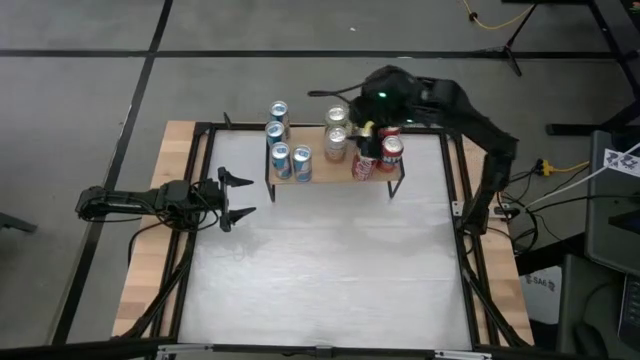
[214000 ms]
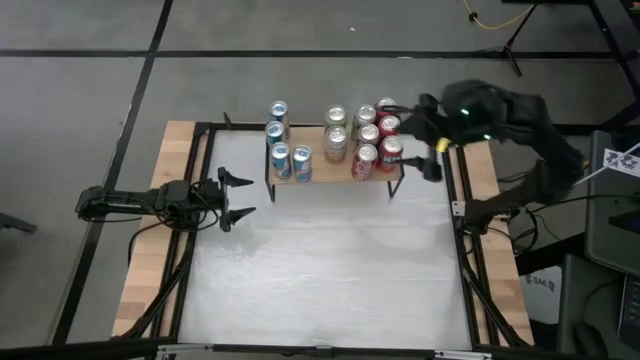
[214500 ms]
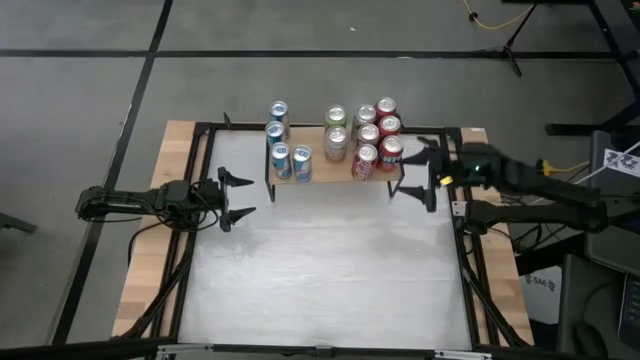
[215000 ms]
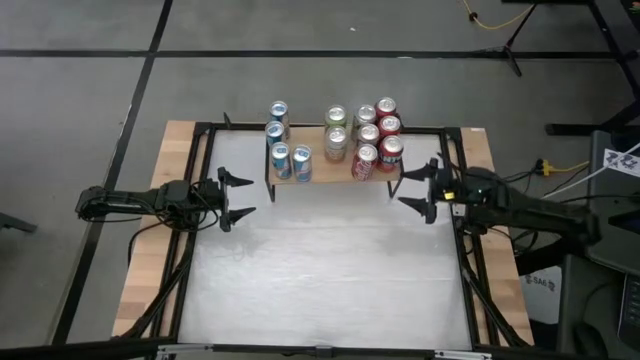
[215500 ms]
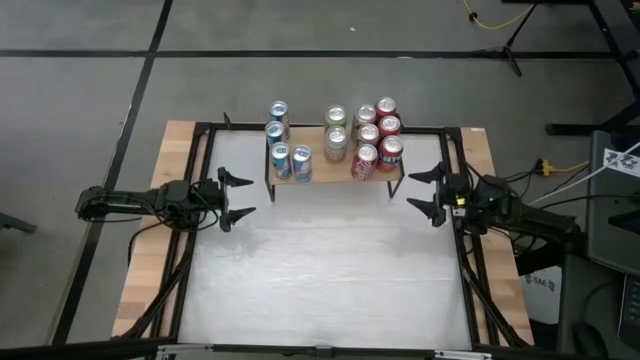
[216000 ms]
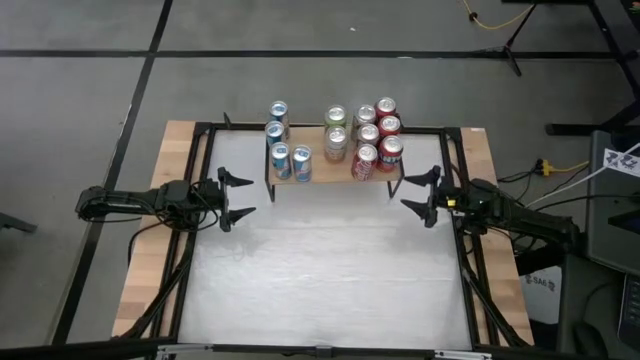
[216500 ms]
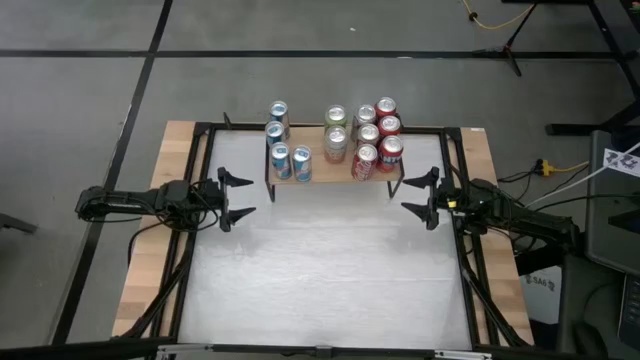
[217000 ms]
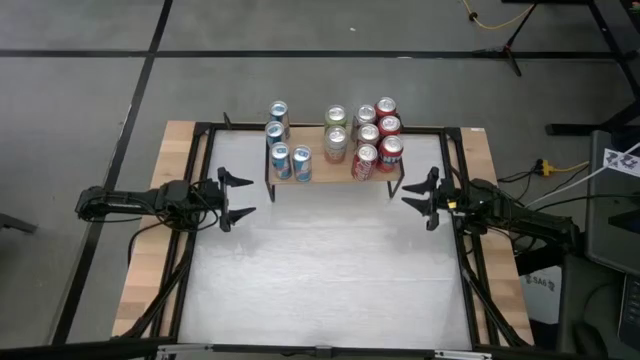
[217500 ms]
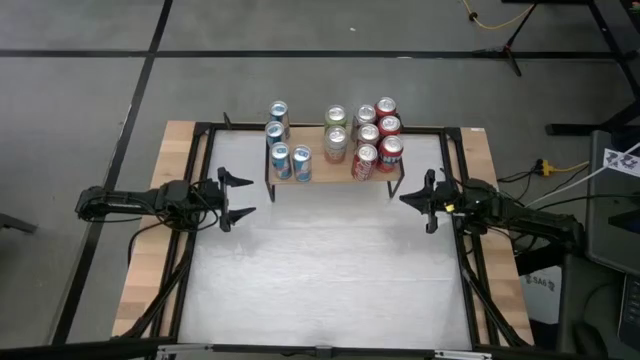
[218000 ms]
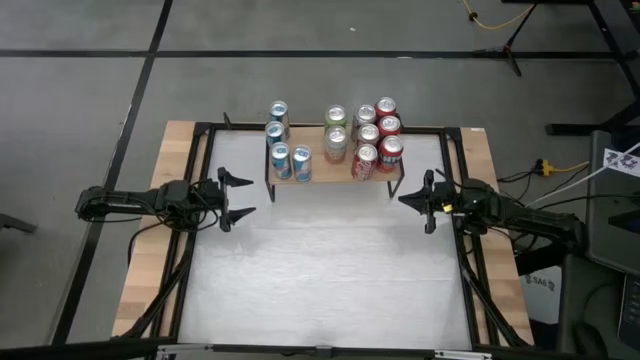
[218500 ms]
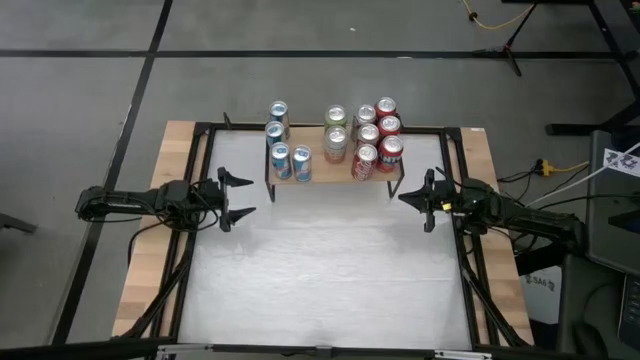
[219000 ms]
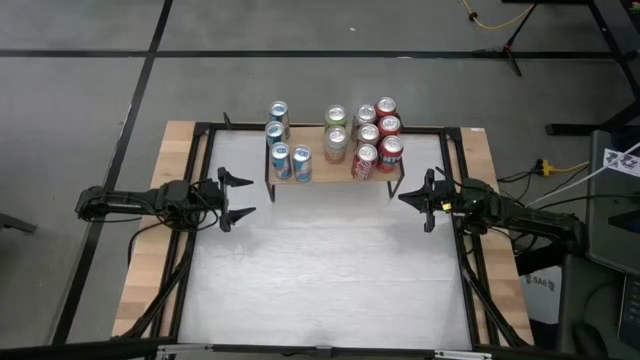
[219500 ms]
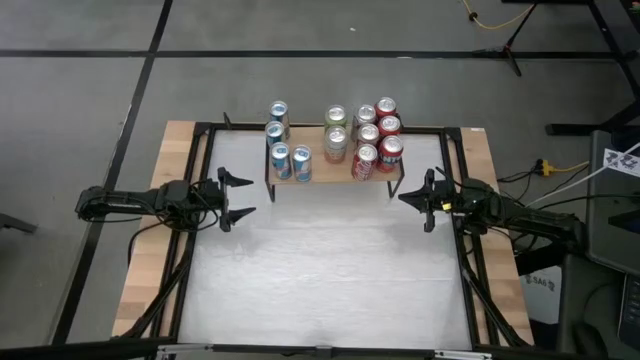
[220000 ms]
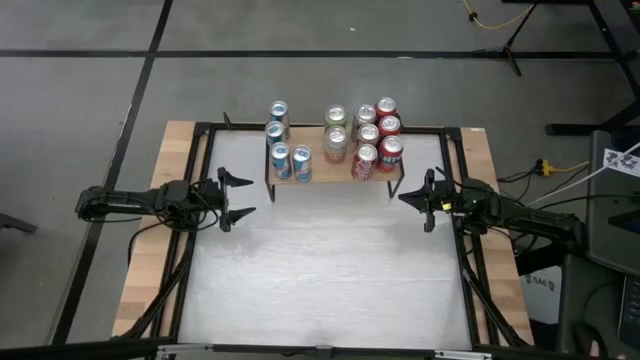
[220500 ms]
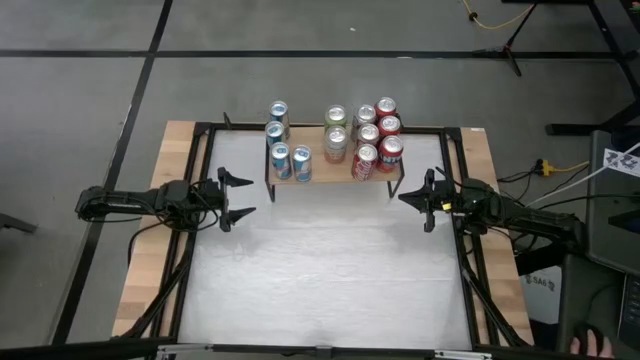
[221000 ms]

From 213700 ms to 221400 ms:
Task: Sort soda cans
Return to Home Position

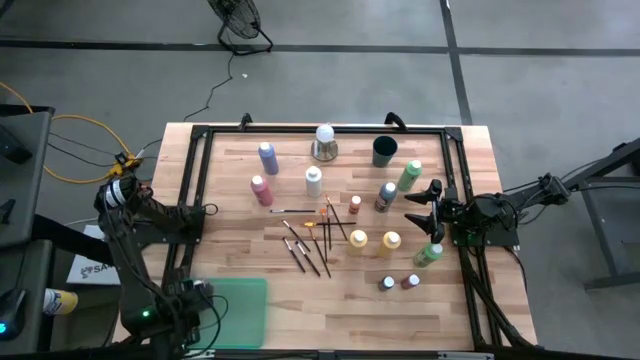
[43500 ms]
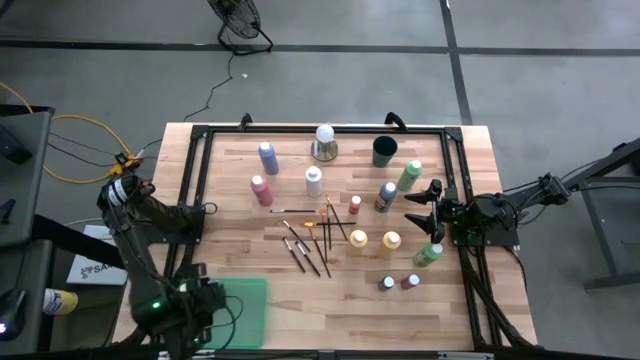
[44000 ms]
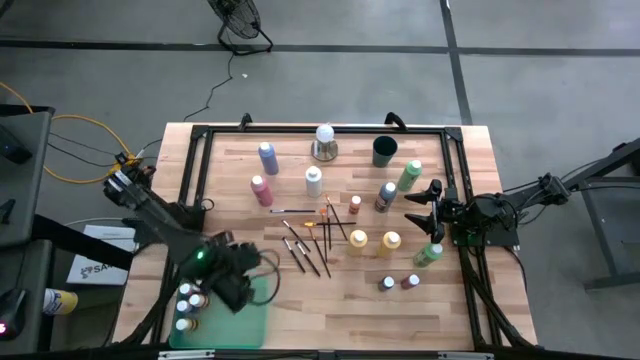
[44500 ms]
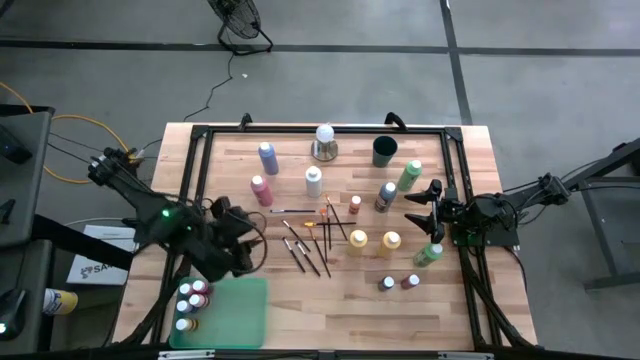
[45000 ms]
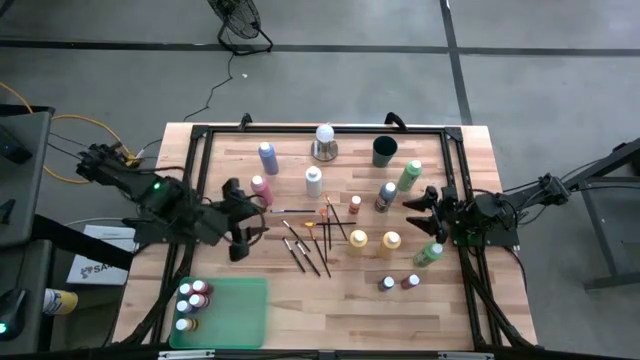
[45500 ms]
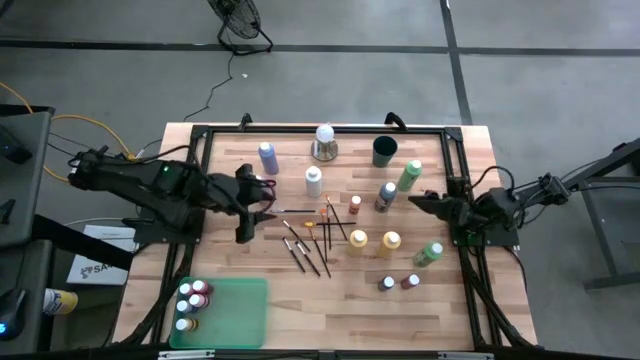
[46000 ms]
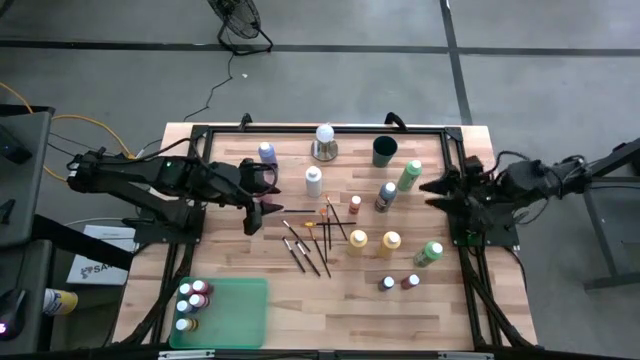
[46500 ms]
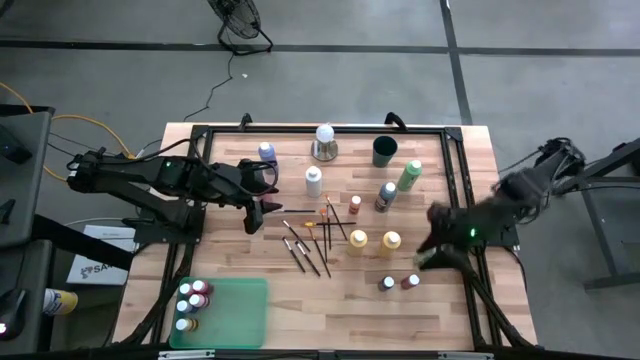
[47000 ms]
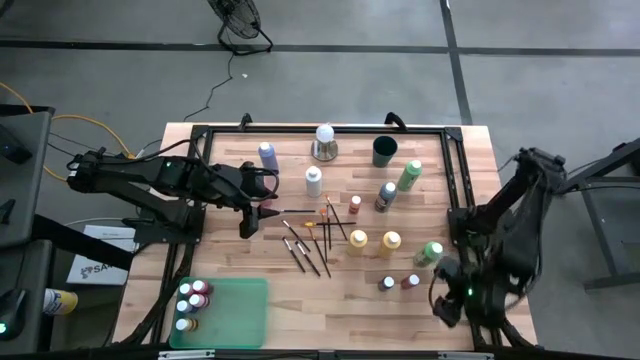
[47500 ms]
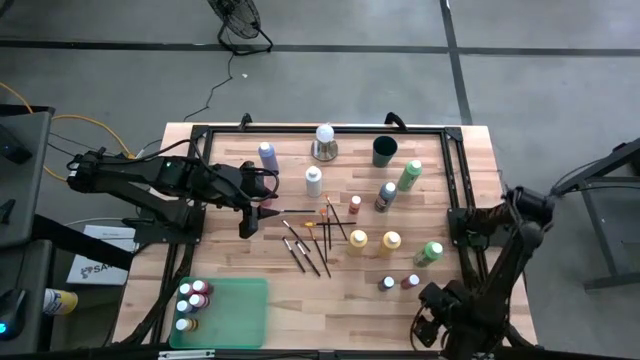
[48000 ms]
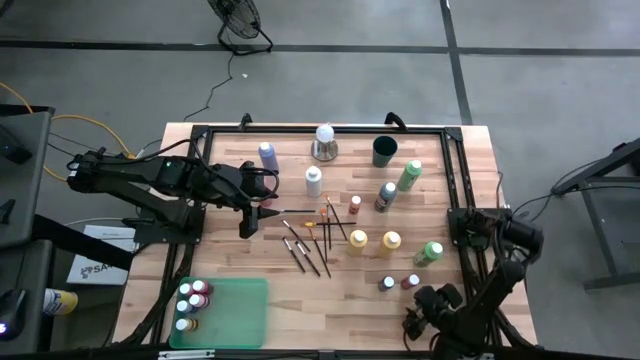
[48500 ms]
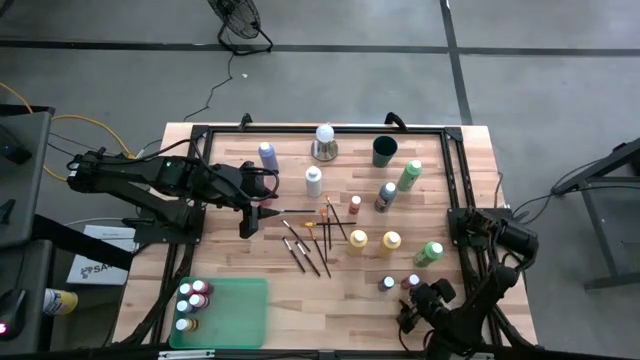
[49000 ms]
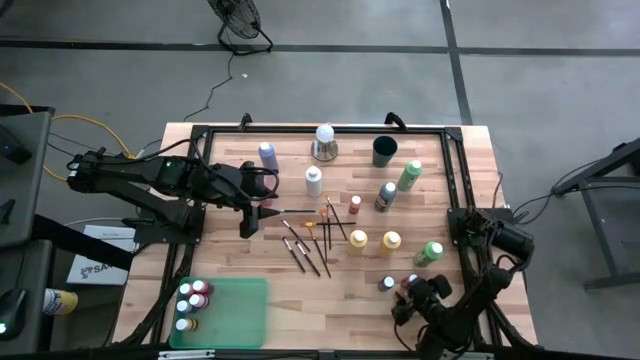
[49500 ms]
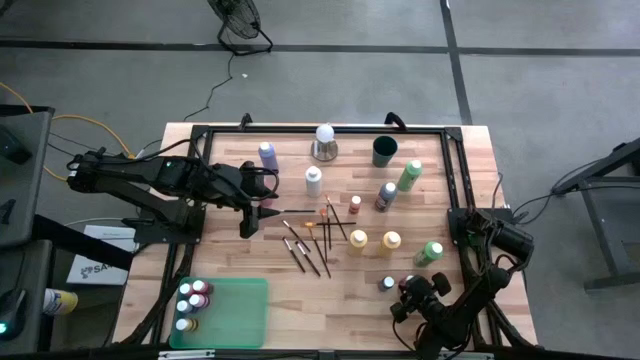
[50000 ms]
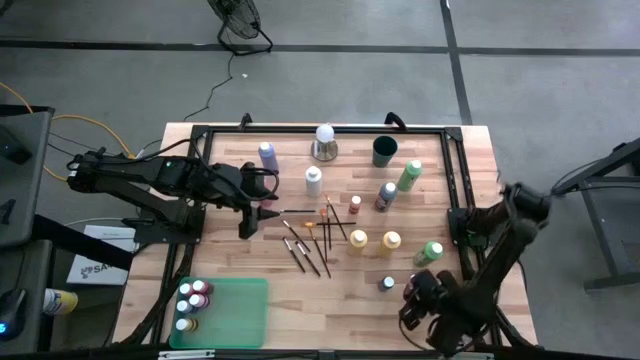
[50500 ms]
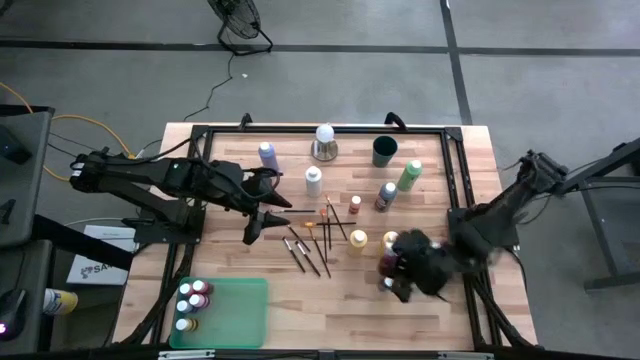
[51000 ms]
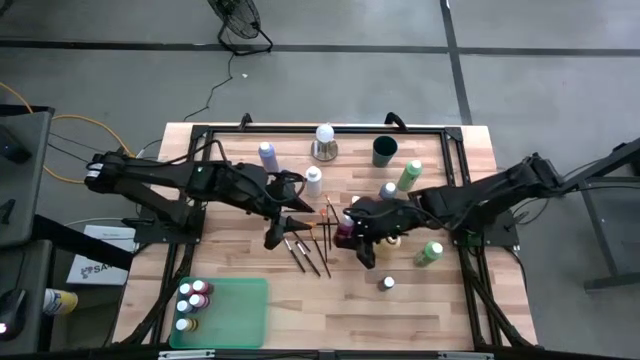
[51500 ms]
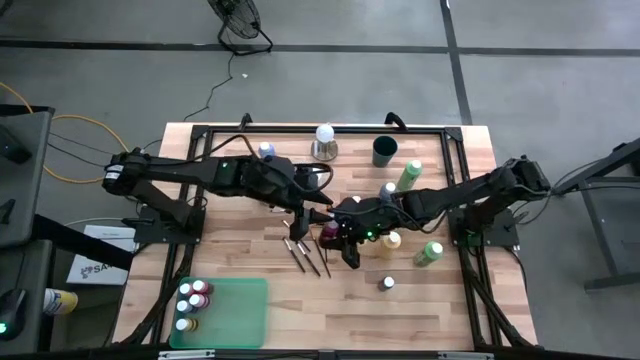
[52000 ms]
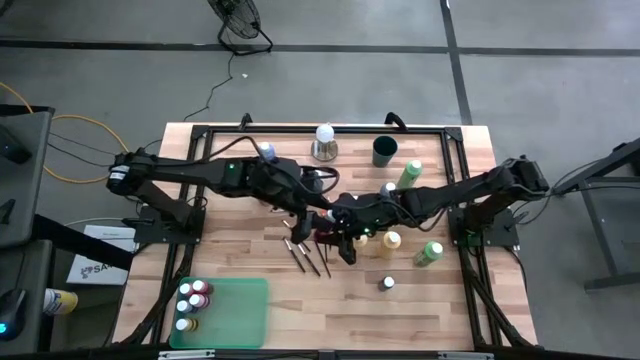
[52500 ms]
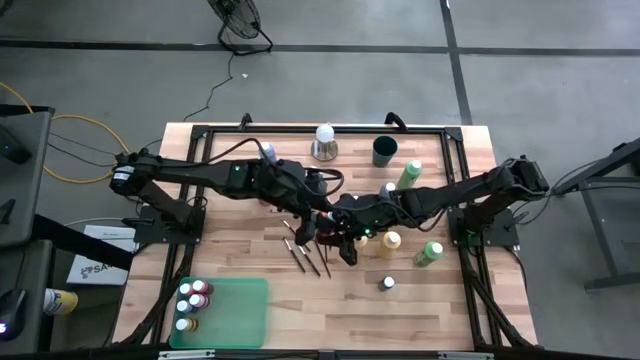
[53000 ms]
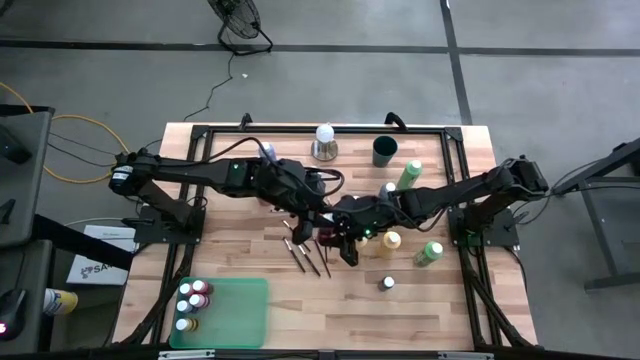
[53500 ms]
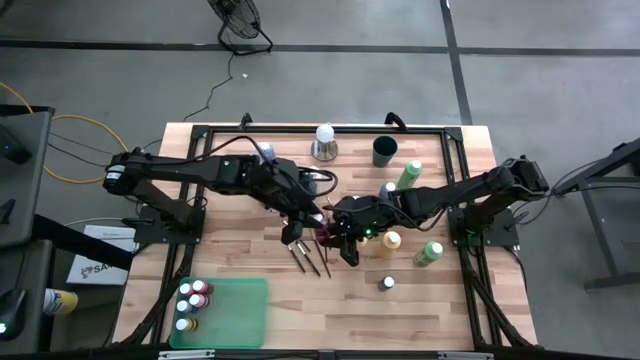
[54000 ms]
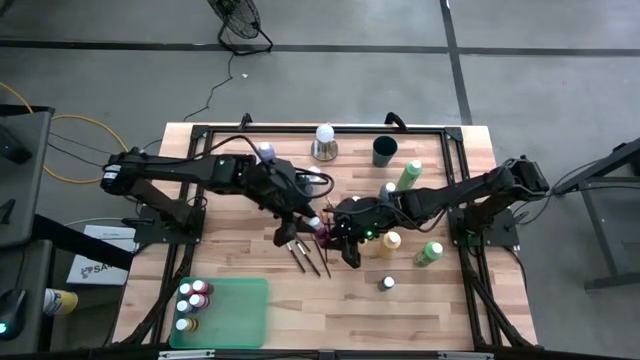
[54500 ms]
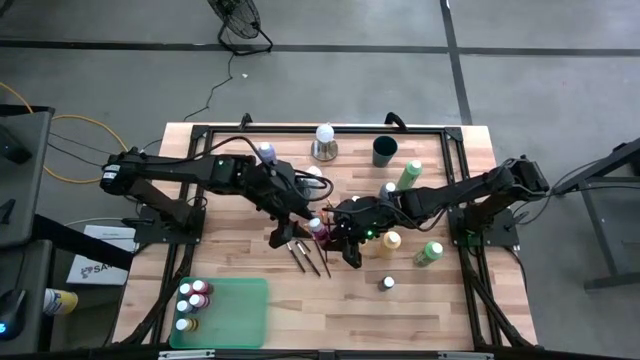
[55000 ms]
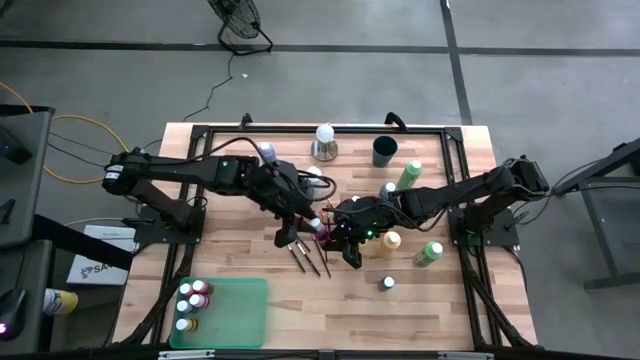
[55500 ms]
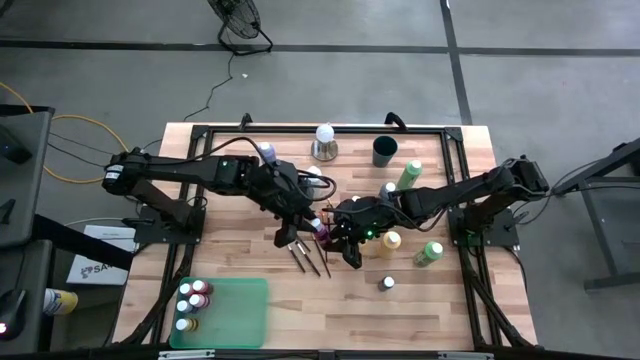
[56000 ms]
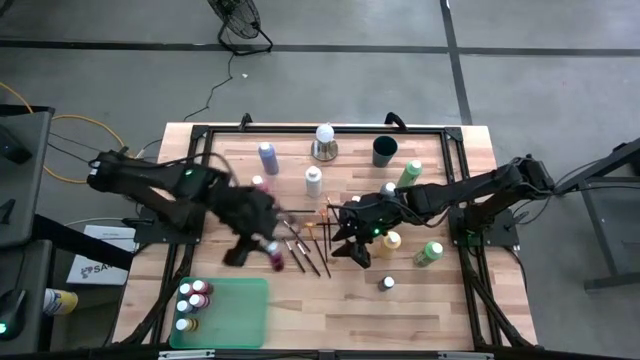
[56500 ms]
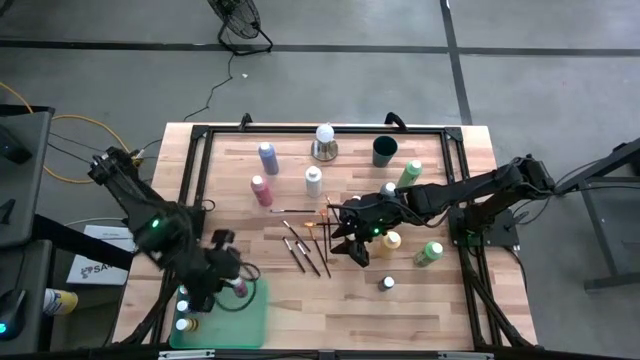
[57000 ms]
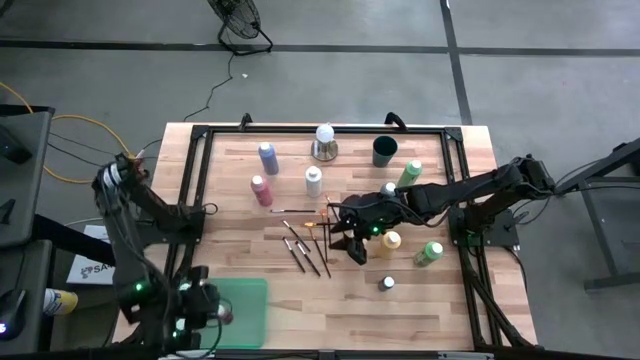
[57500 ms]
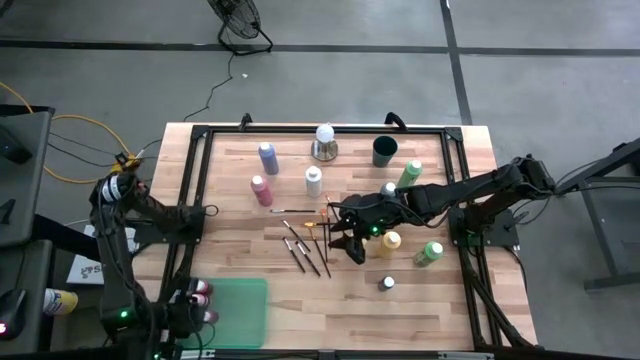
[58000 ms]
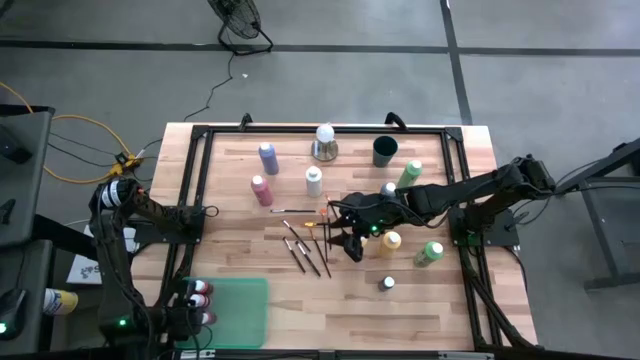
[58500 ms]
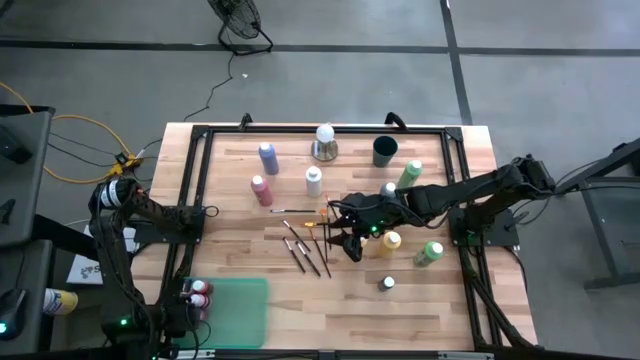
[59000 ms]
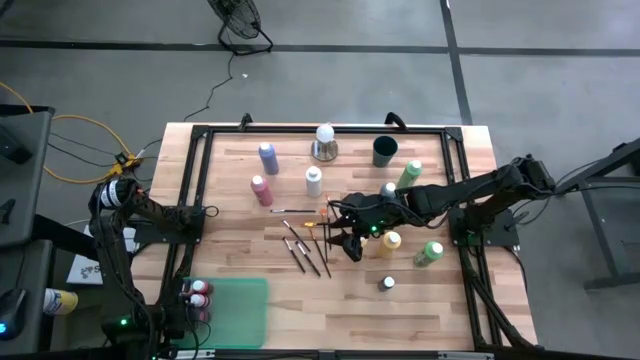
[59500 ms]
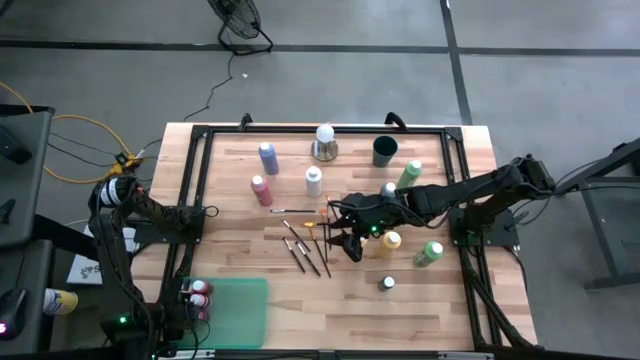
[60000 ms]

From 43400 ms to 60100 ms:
Task: Pick & Place Paint Supplies
Put the purple paint bottle into the green bin
